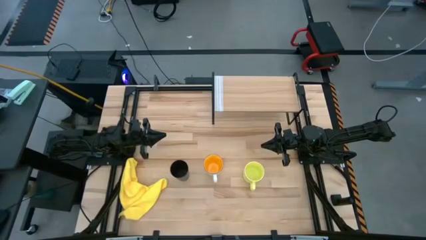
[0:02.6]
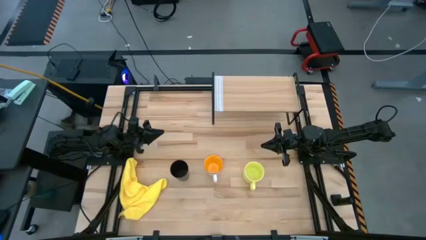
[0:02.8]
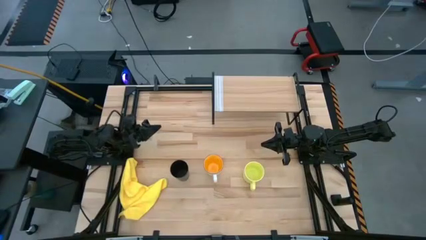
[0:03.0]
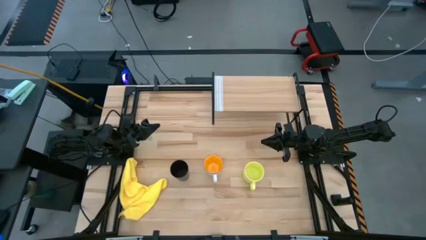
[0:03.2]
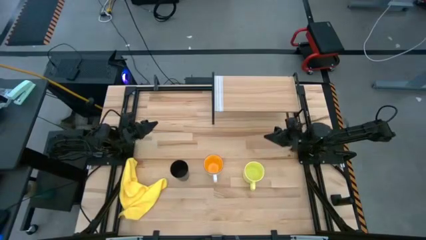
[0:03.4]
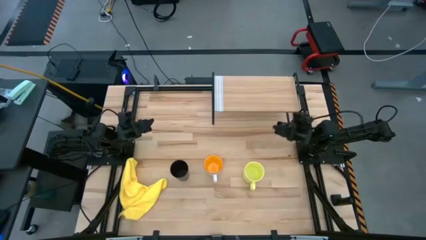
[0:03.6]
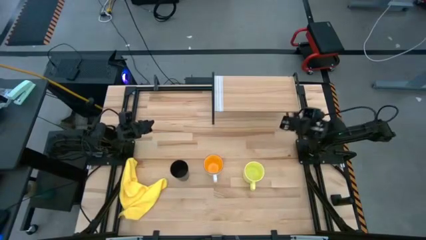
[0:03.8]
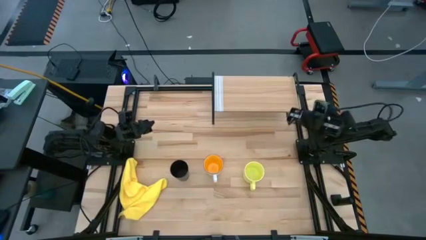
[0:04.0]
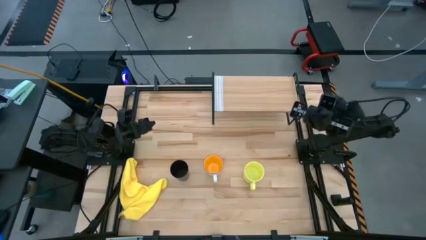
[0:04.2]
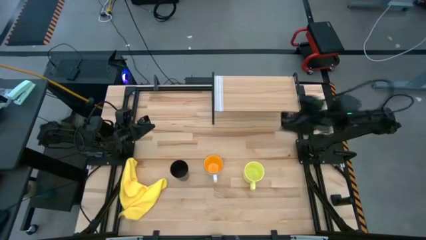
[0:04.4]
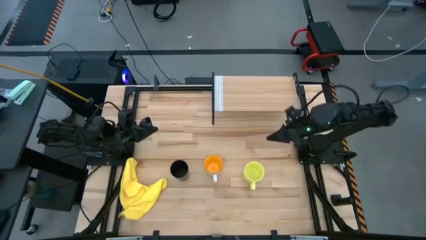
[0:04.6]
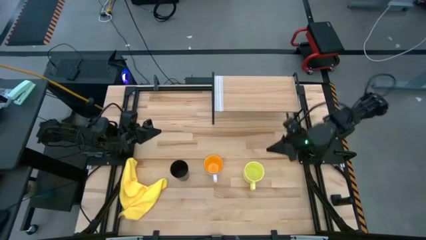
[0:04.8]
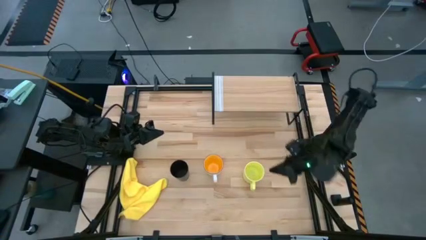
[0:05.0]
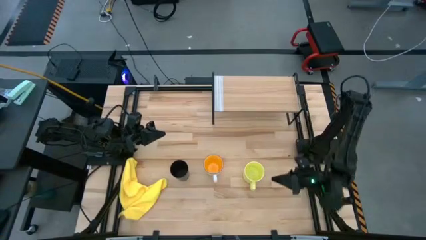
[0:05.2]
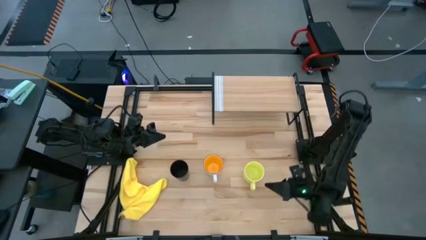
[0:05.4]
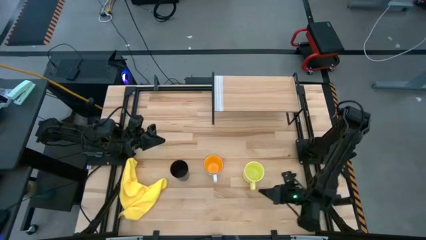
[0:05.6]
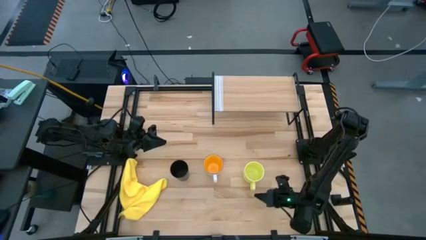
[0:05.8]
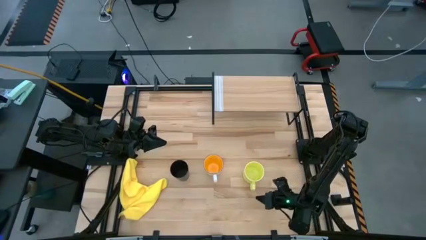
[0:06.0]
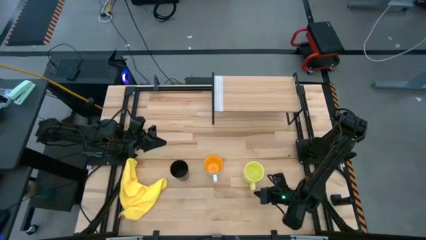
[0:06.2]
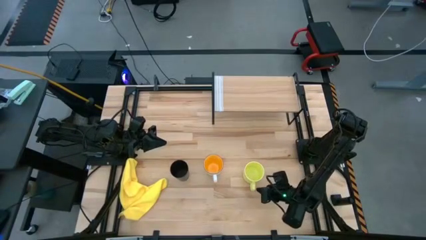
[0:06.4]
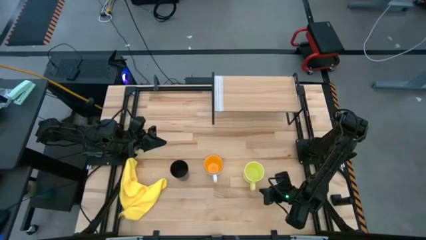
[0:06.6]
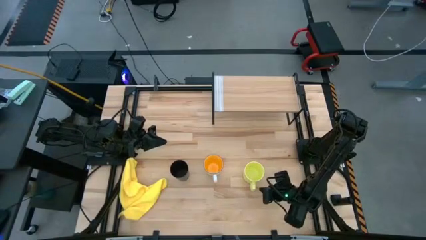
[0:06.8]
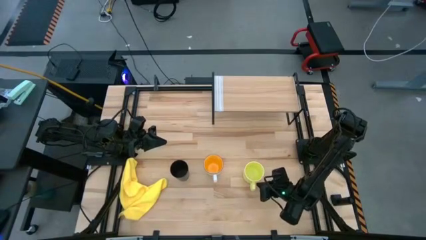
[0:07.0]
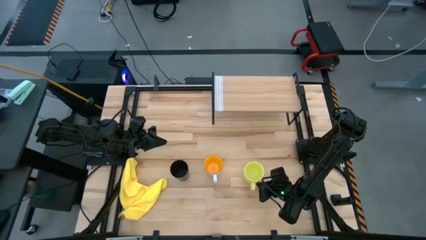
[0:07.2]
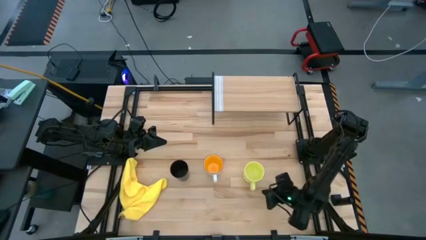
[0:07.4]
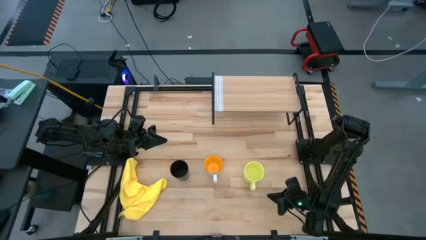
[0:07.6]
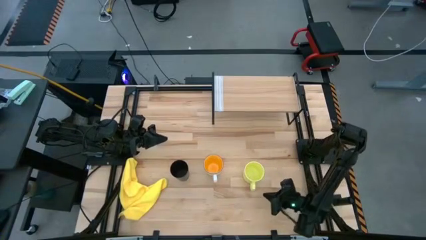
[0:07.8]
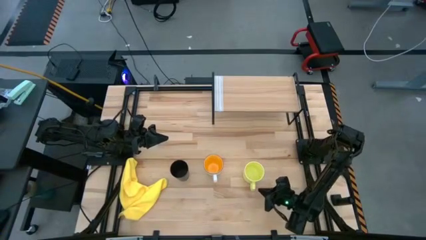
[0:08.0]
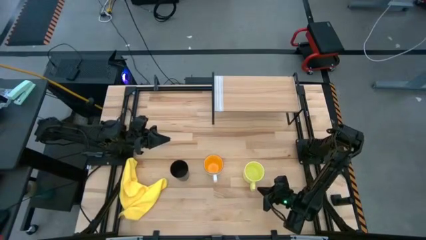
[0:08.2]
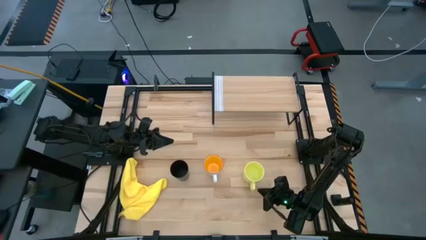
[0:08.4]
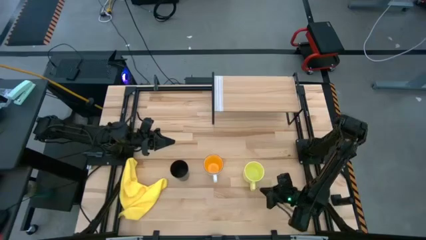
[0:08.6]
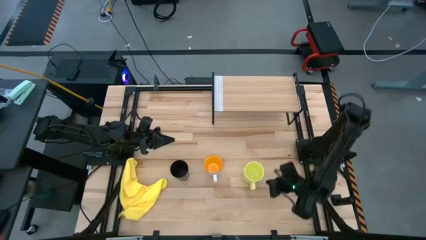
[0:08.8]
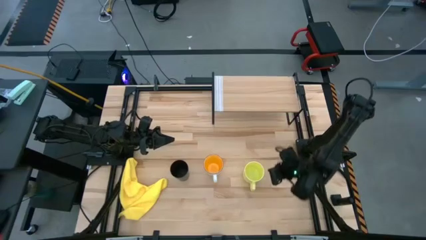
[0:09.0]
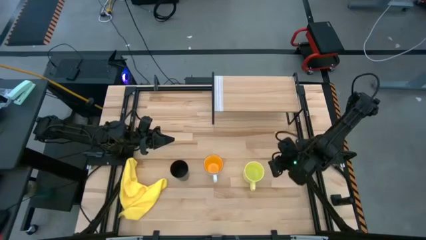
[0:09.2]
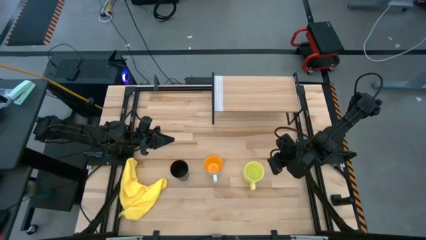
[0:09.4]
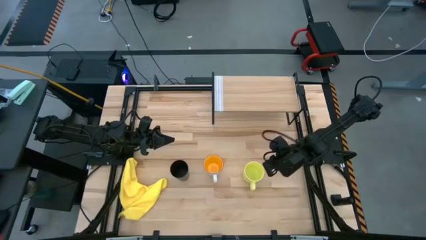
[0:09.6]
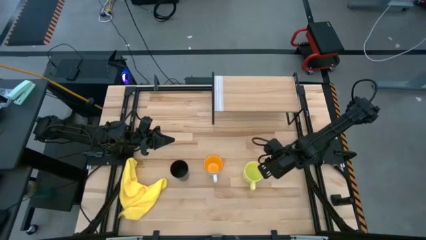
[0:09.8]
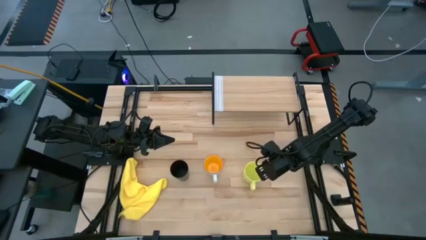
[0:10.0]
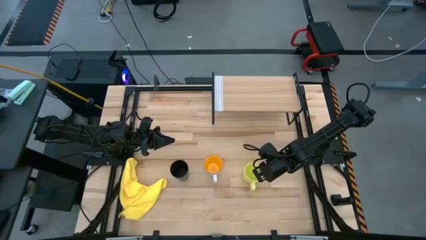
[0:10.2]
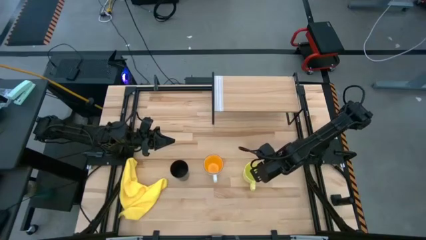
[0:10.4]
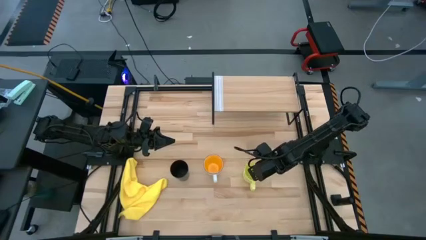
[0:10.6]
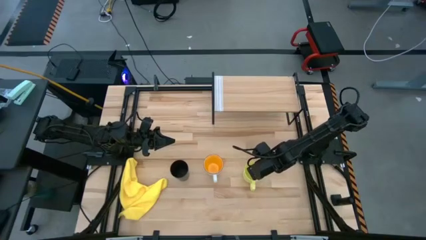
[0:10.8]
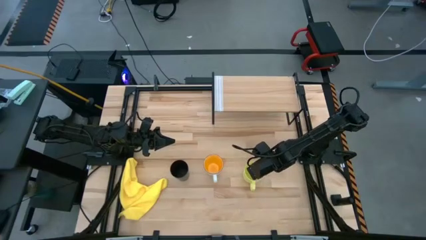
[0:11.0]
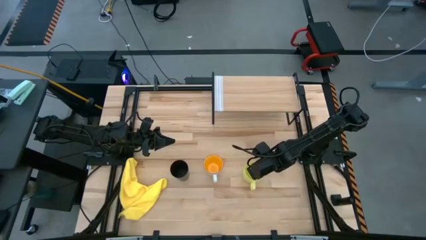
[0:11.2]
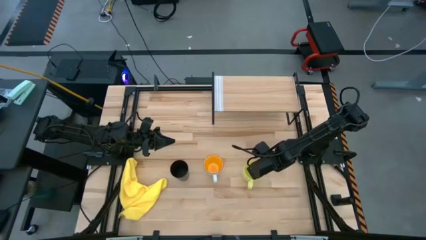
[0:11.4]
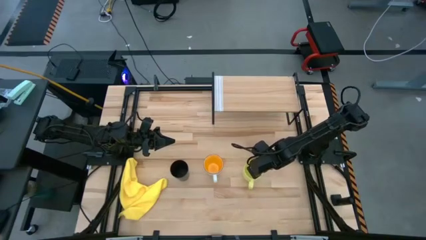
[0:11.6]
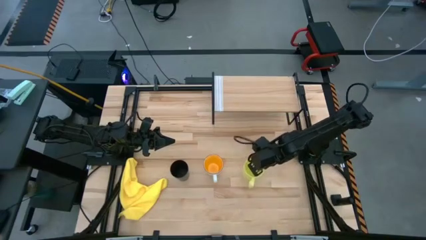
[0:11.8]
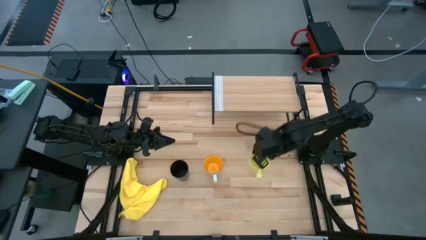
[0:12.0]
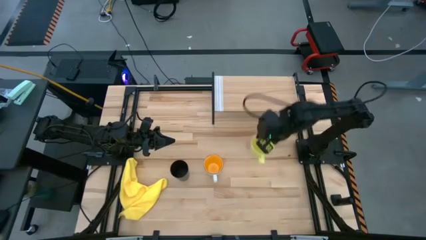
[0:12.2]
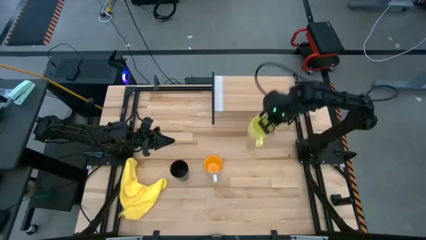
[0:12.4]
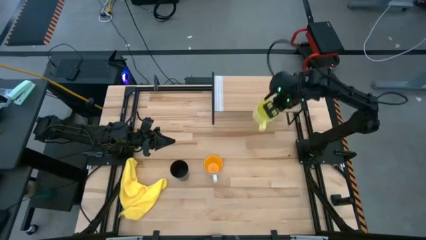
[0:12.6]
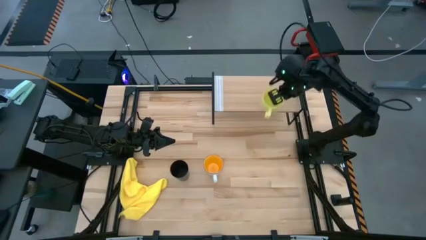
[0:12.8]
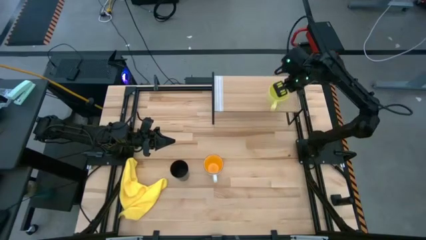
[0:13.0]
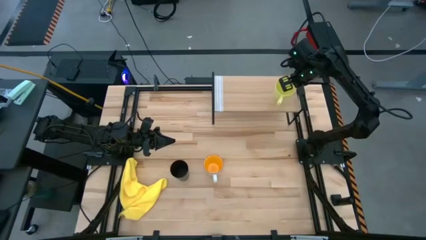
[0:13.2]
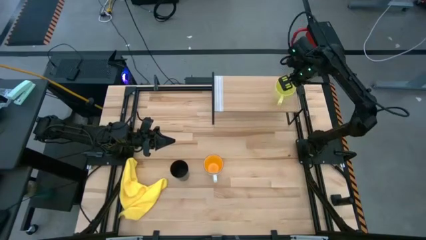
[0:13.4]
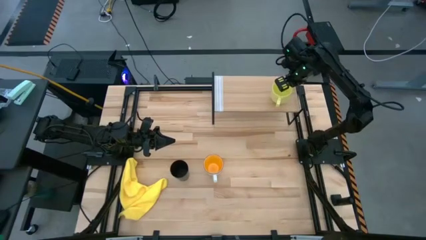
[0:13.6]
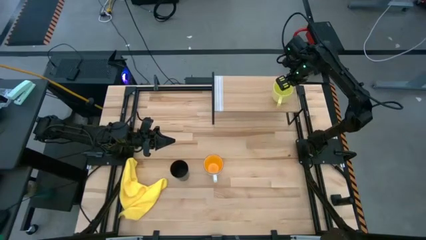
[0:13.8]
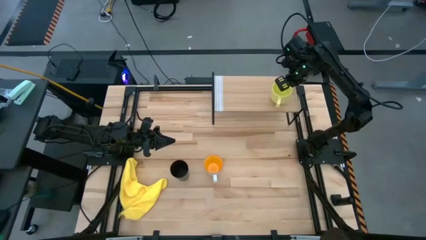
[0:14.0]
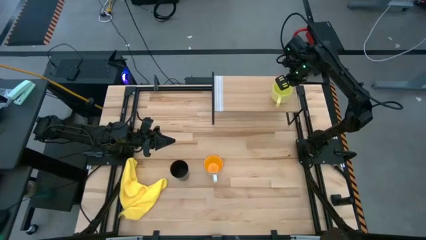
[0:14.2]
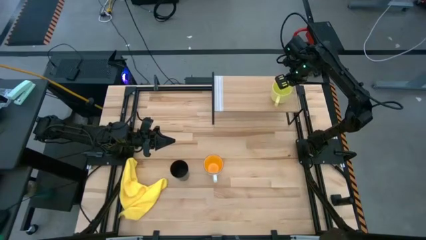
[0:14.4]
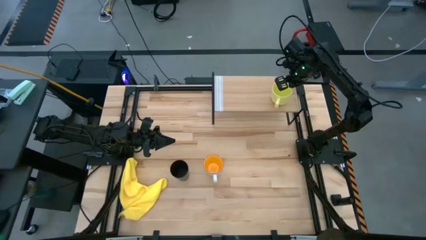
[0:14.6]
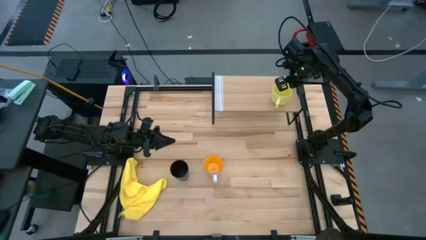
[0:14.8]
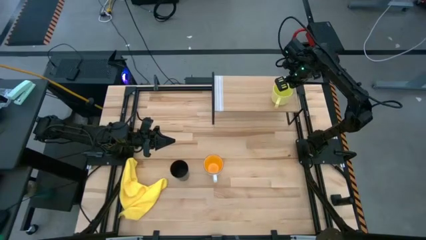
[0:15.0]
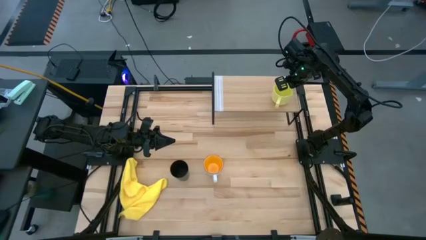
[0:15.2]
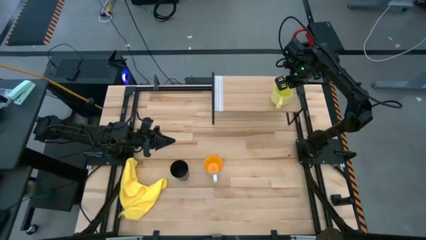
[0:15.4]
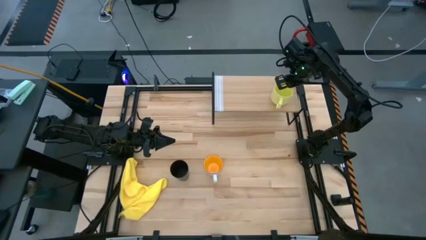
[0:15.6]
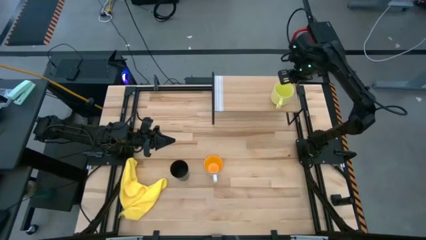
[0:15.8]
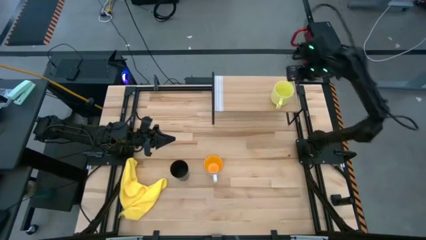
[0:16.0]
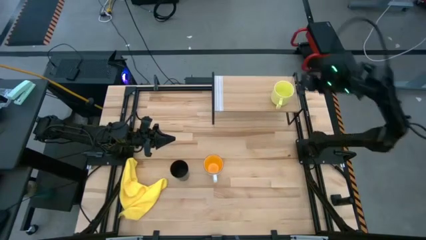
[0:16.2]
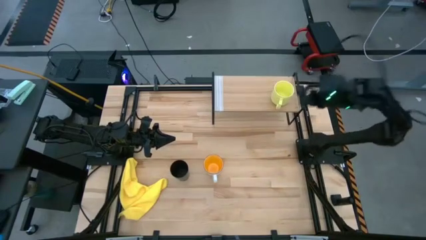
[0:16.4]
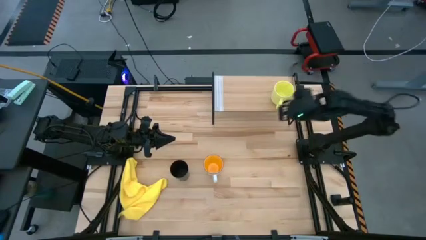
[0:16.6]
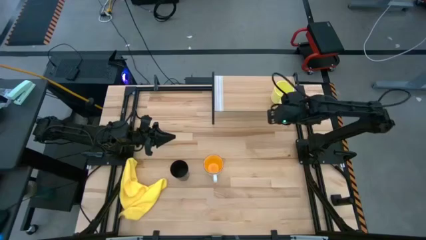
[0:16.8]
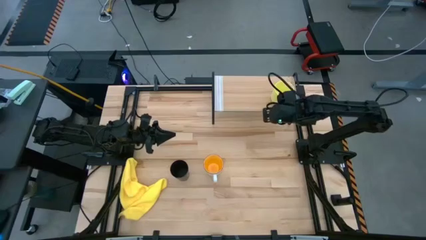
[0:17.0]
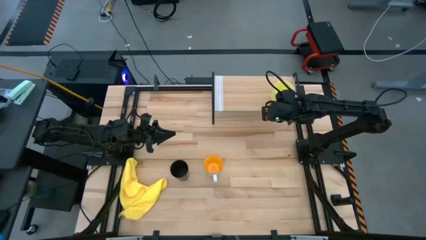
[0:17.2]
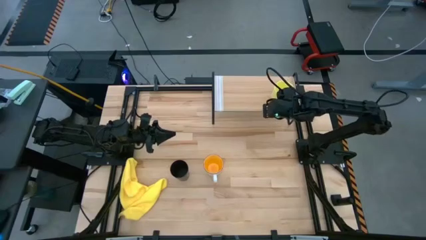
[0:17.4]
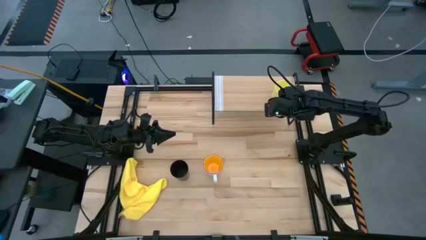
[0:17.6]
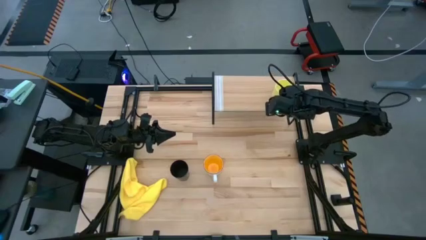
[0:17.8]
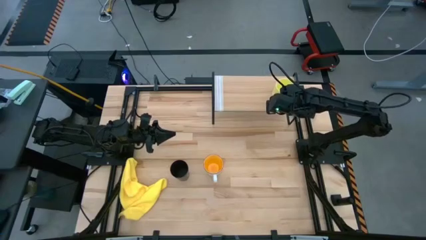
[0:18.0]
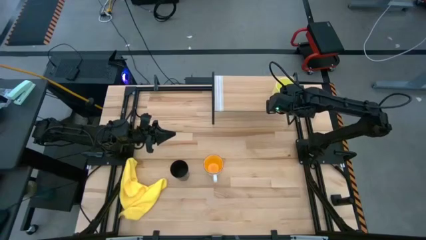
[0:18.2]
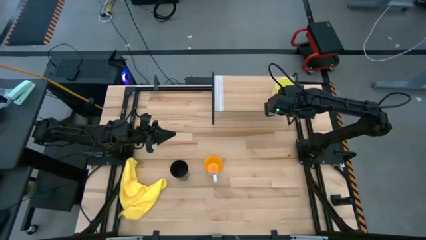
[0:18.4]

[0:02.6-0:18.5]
Task: Stack small to large cups/mugs on shelf
Put the yellow mug on the shelf
